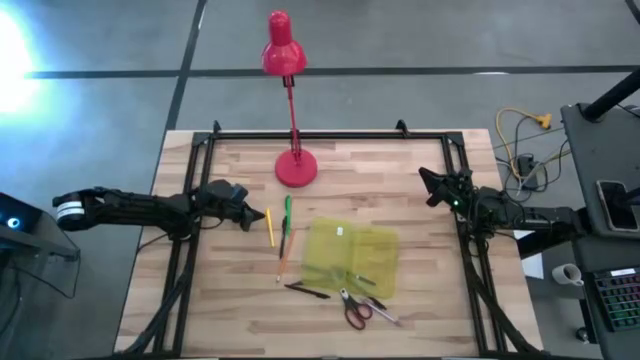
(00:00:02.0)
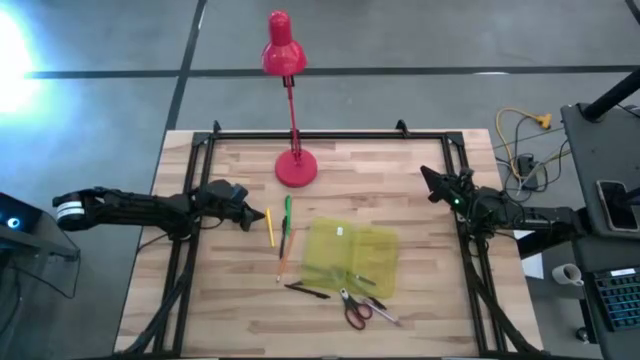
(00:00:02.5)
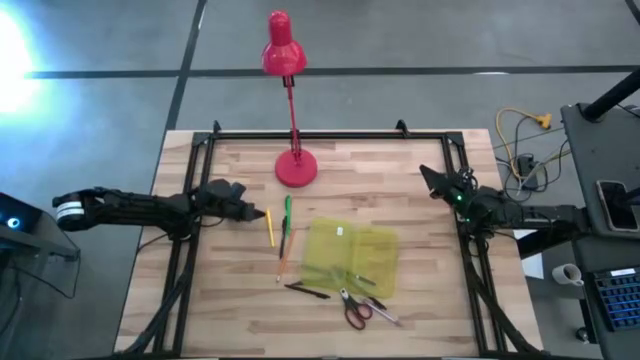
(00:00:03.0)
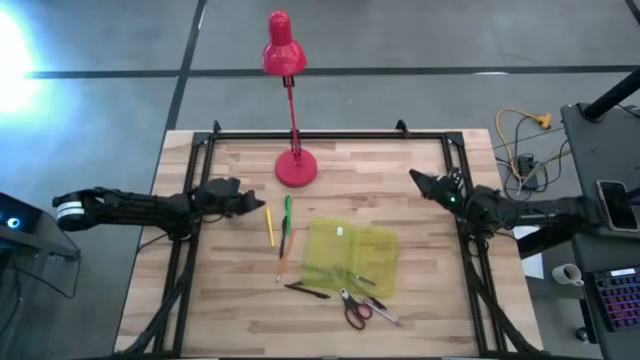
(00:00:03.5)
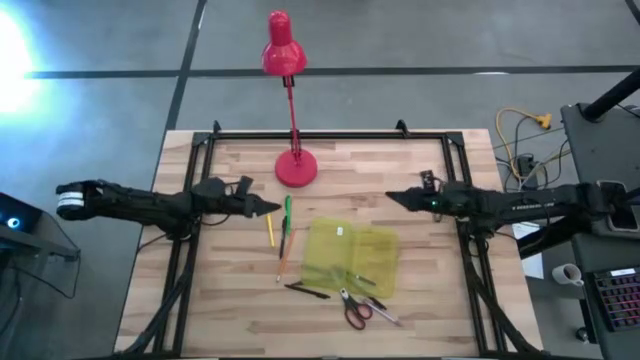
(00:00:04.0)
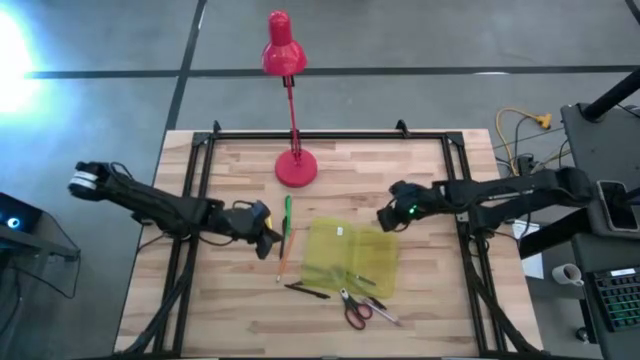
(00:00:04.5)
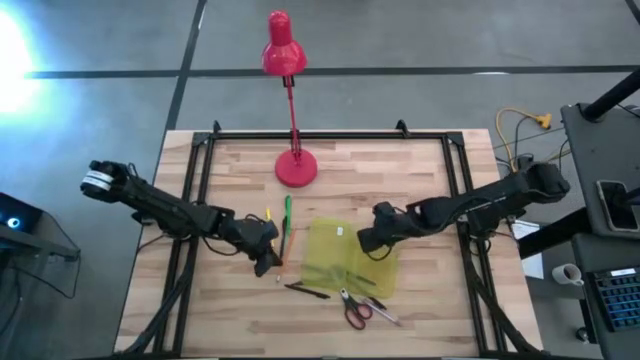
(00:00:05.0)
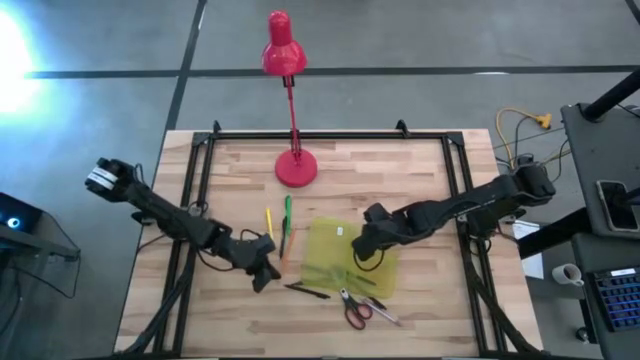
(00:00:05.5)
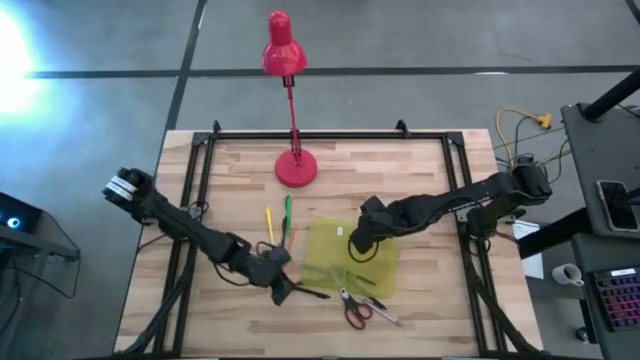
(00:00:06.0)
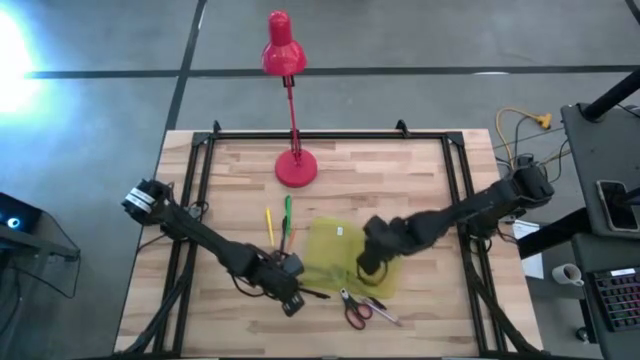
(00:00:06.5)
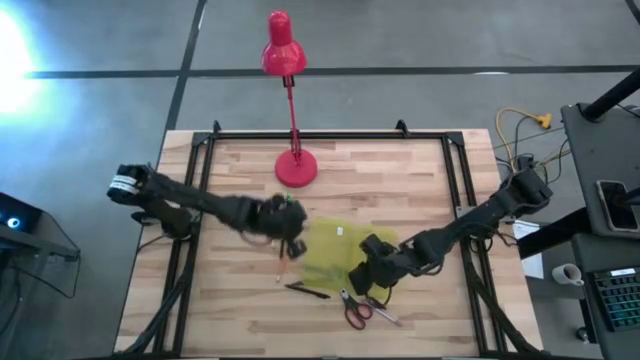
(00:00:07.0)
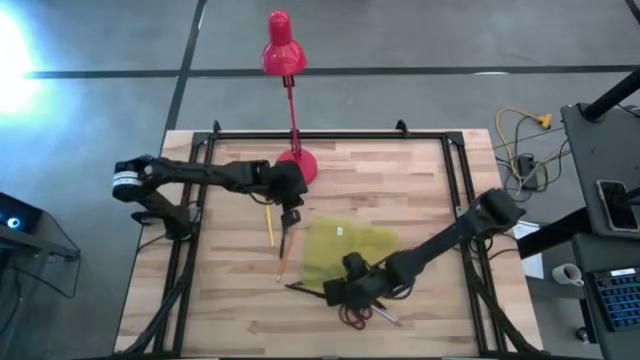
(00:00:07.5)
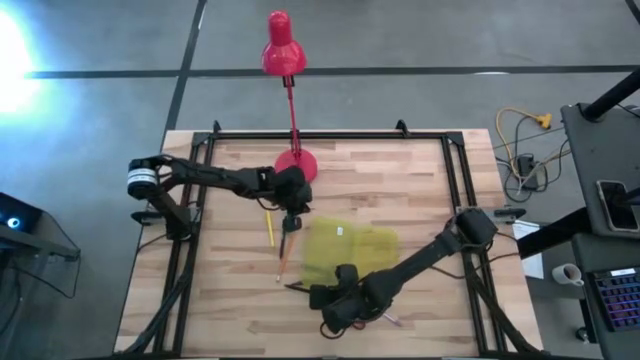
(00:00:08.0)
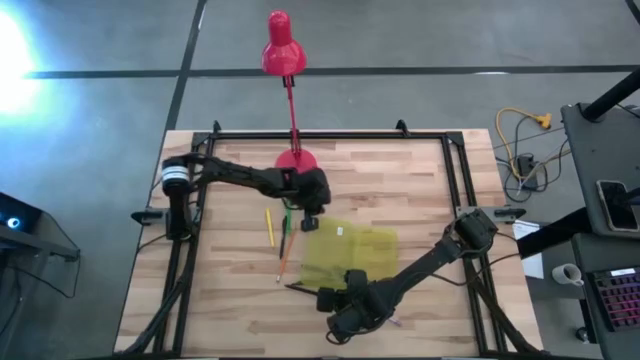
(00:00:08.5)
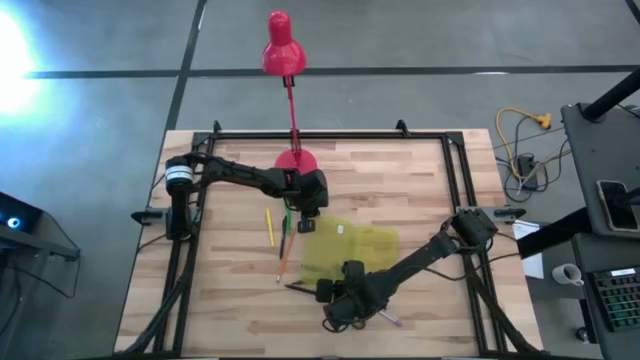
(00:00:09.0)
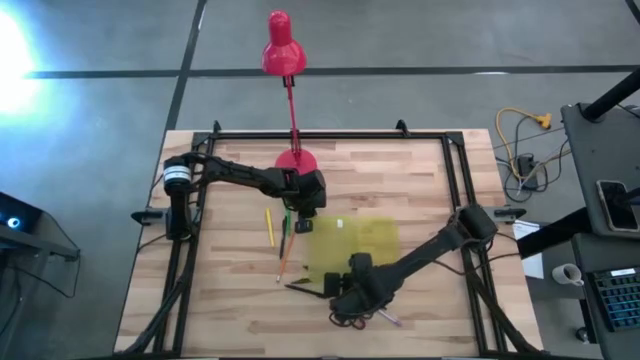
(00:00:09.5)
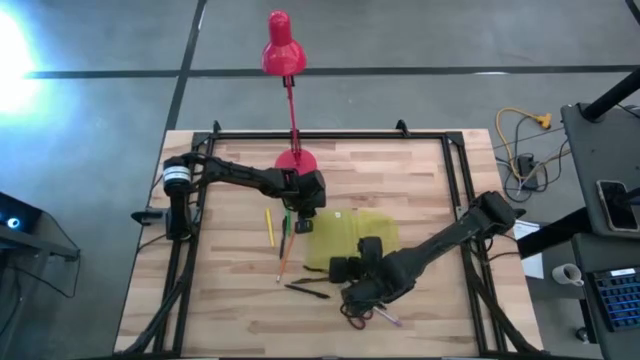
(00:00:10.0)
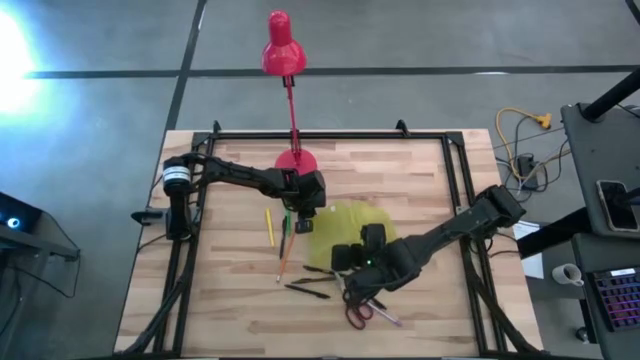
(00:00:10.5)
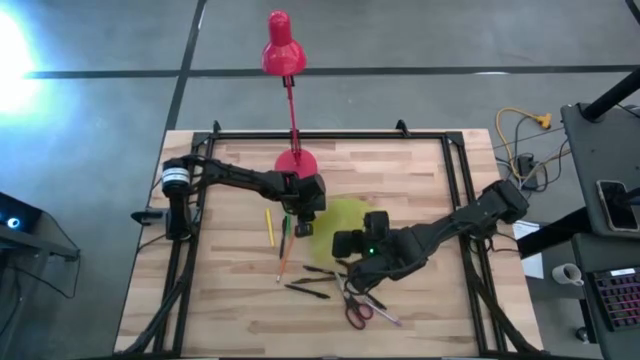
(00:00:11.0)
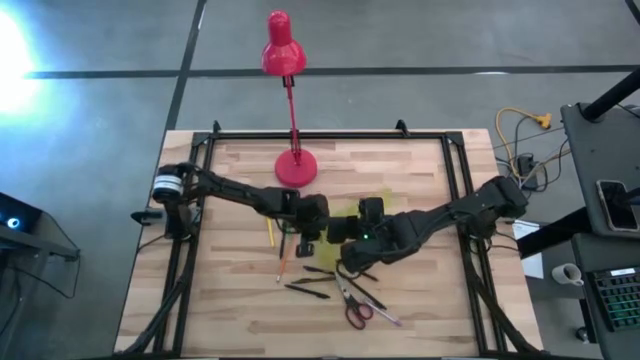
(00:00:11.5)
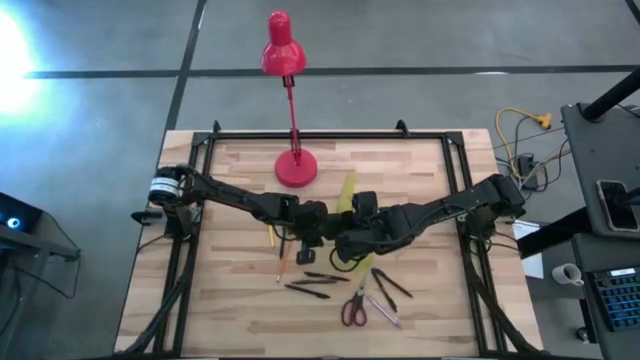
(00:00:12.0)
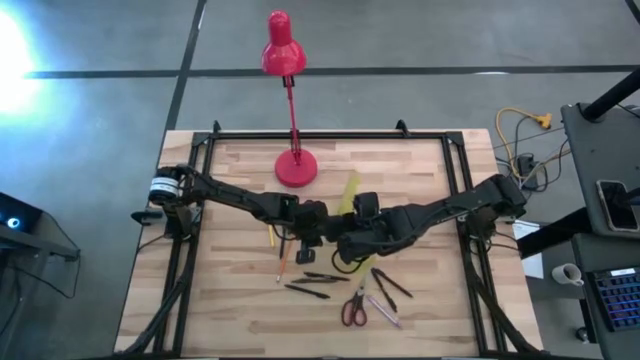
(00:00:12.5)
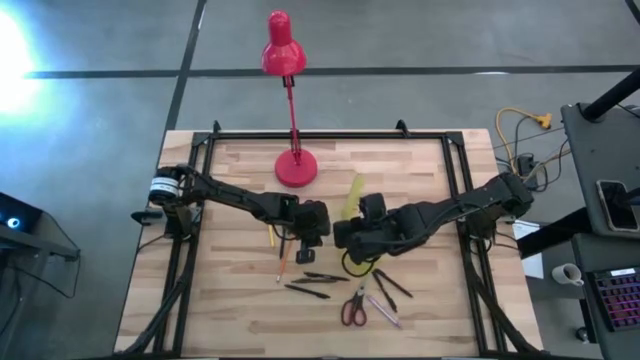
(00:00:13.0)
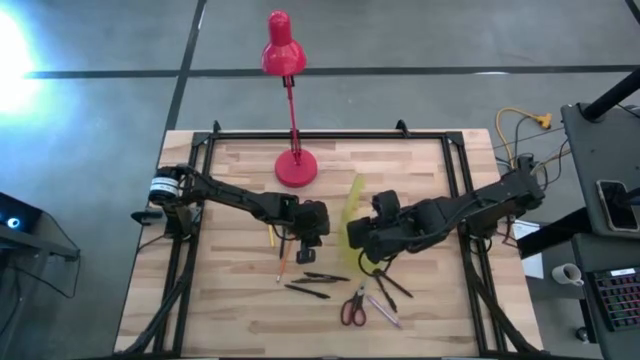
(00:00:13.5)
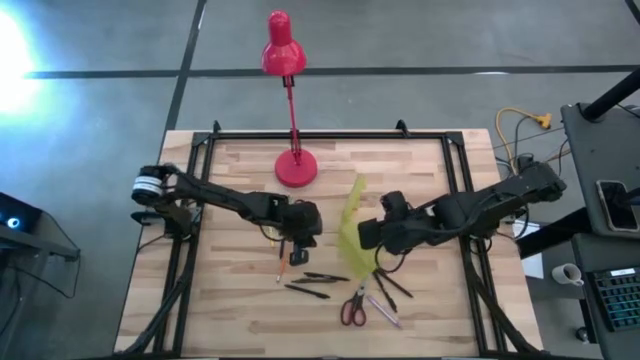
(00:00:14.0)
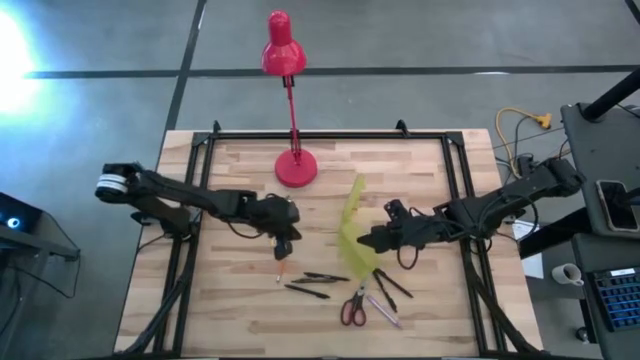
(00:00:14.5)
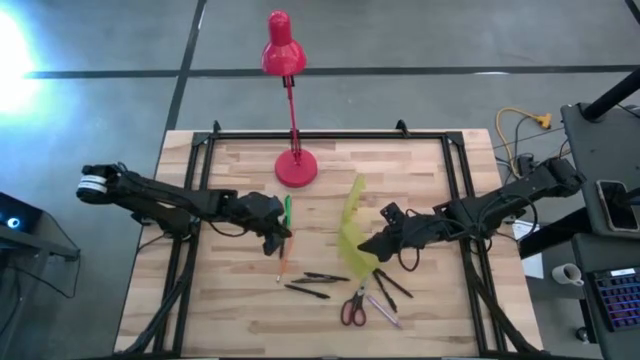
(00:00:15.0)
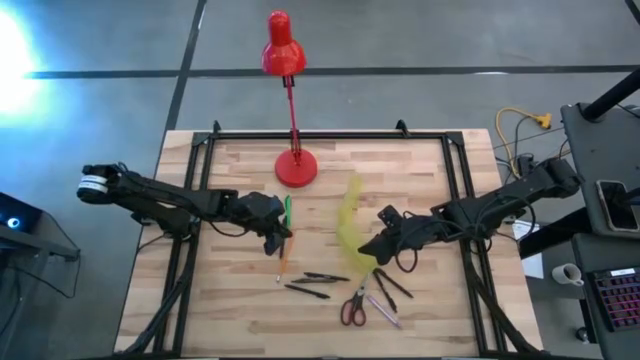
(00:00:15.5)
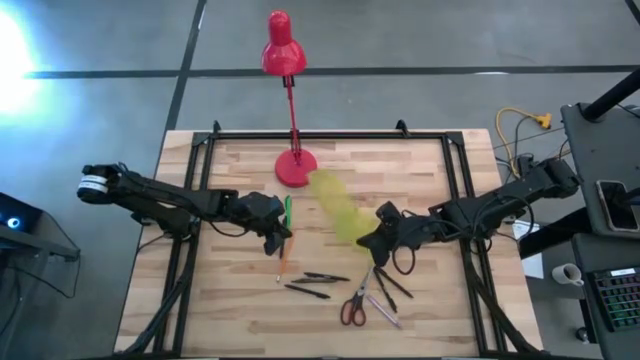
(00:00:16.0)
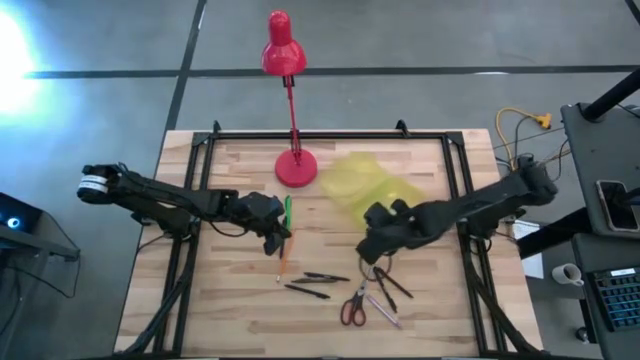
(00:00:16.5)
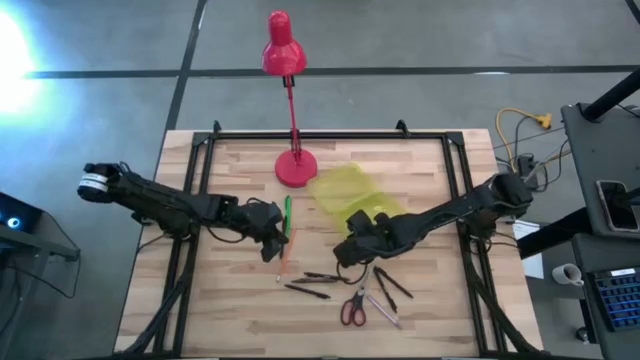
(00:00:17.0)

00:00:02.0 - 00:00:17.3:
Task: Pick & place school supplies into a supply box
Prepare the yellow supply box

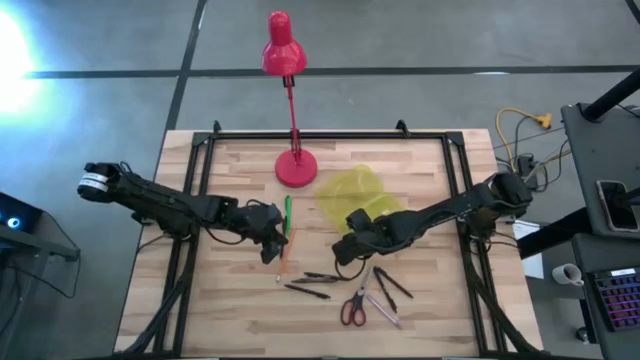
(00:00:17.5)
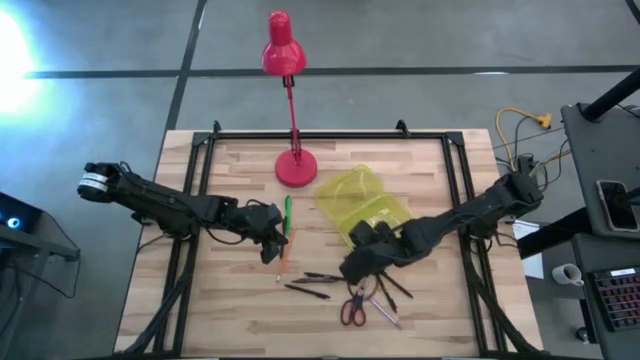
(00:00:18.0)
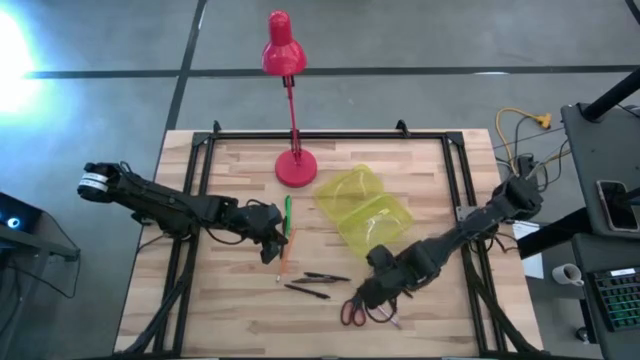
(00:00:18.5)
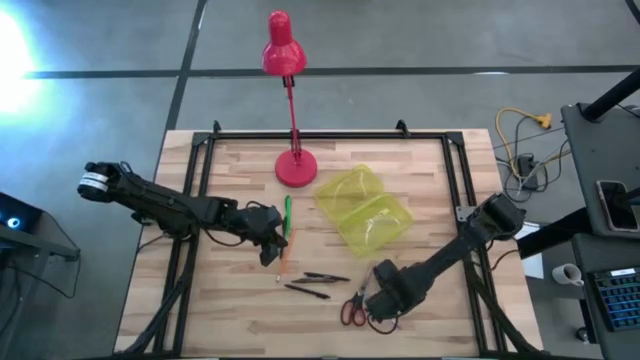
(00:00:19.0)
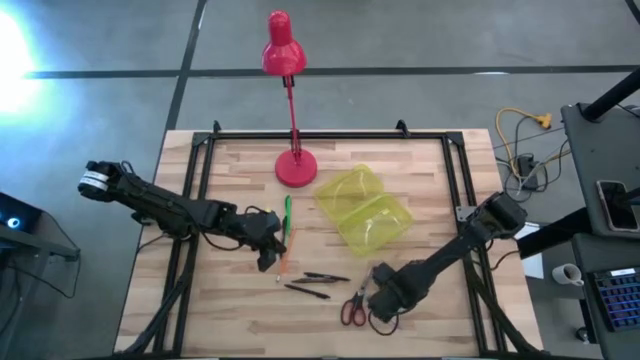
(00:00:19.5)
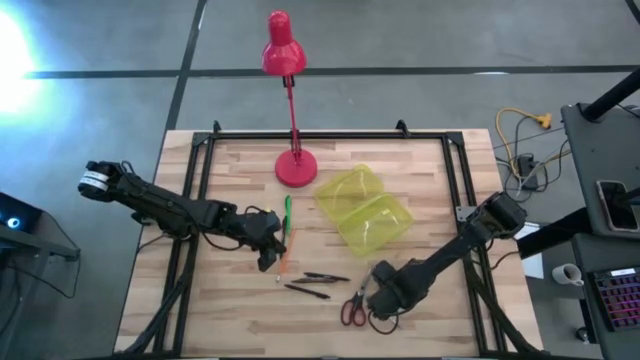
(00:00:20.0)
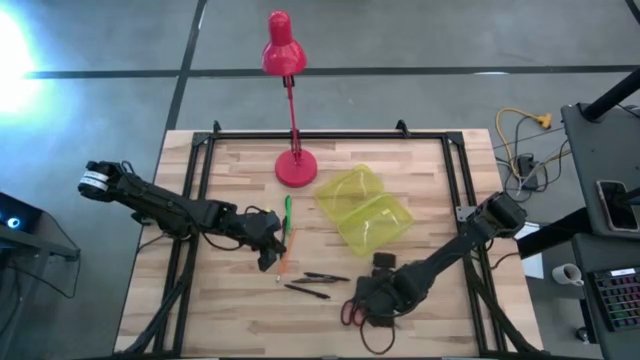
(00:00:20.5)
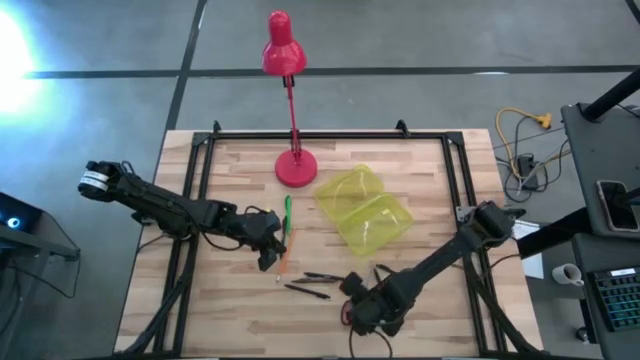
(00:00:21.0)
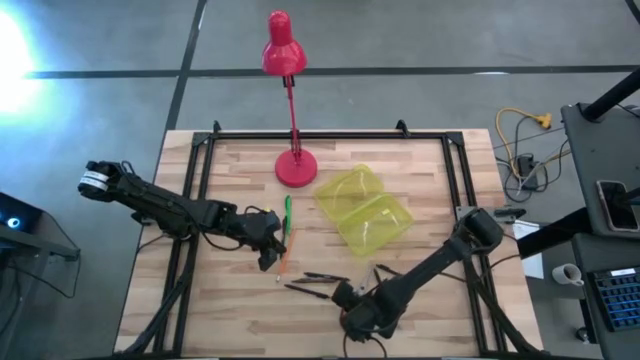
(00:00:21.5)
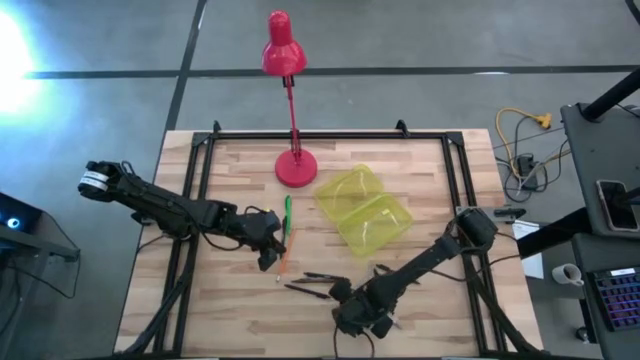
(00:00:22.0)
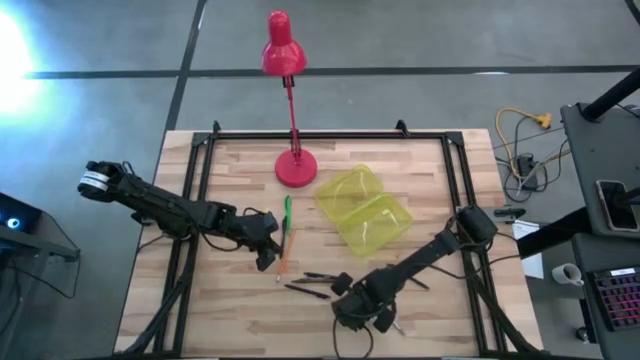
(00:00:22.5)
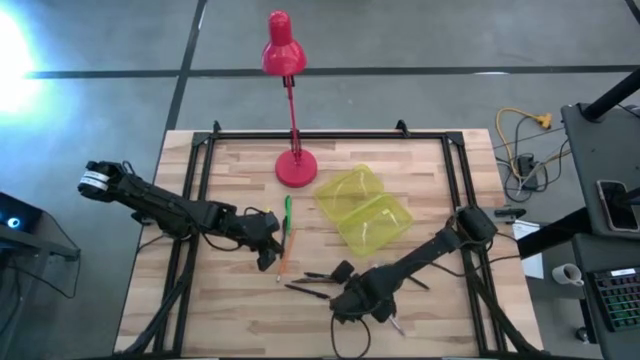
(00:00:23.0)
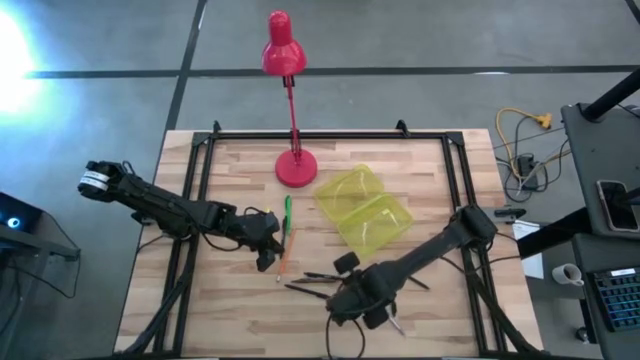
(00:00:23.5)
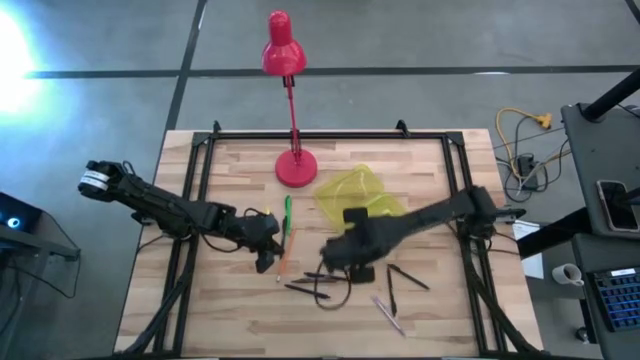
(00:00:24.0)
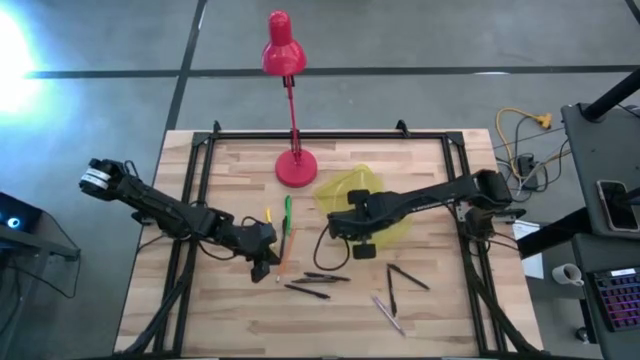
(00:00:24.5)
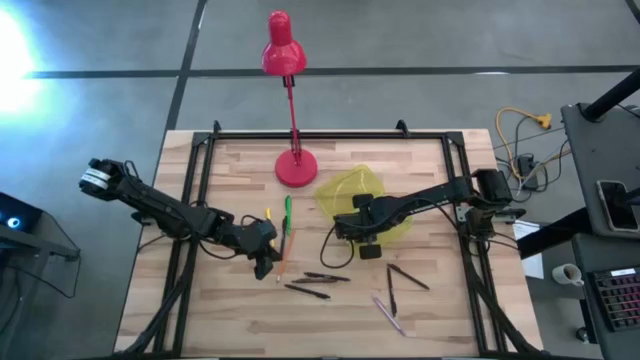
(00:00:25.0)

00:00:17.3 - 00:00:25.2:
Put the black scissors into the yellow supply box
